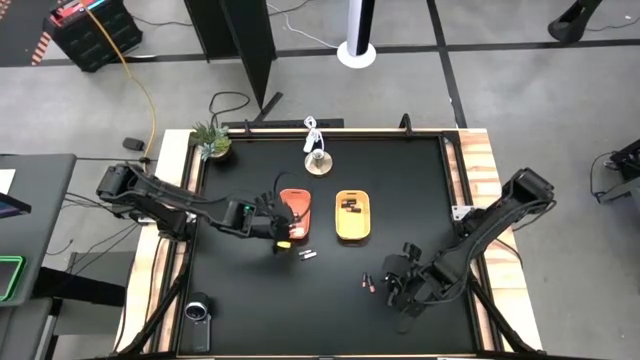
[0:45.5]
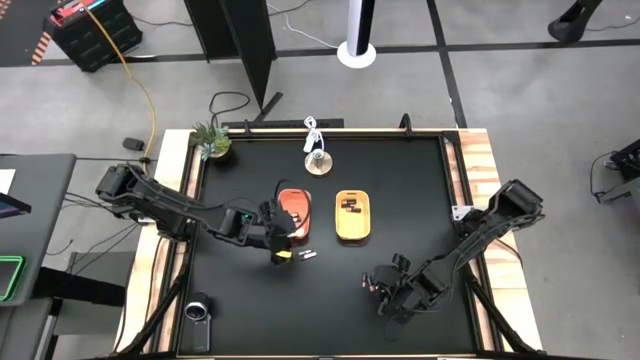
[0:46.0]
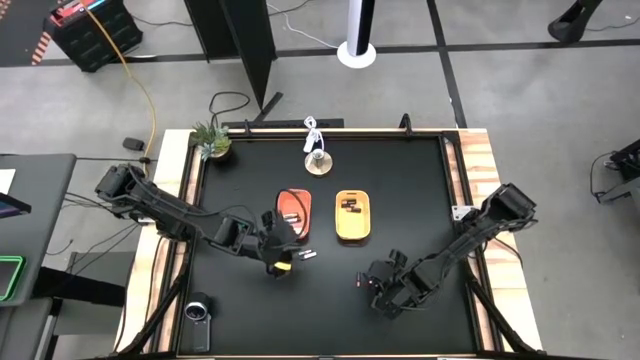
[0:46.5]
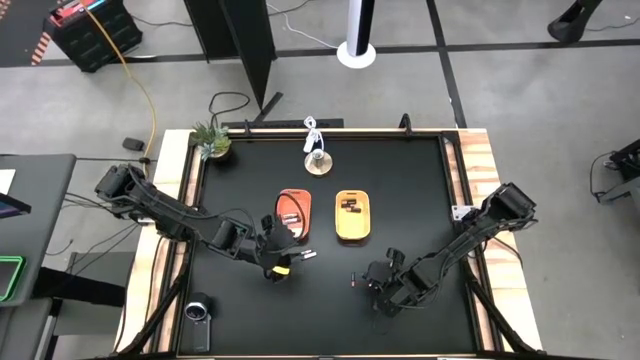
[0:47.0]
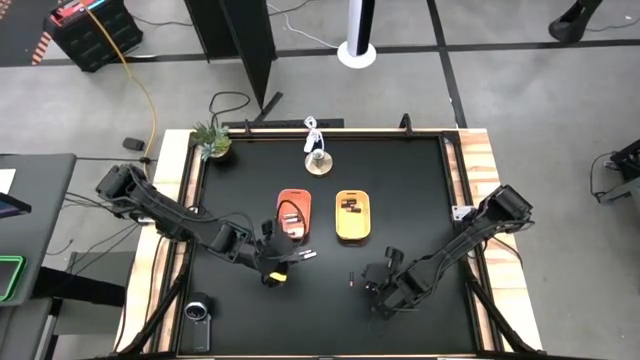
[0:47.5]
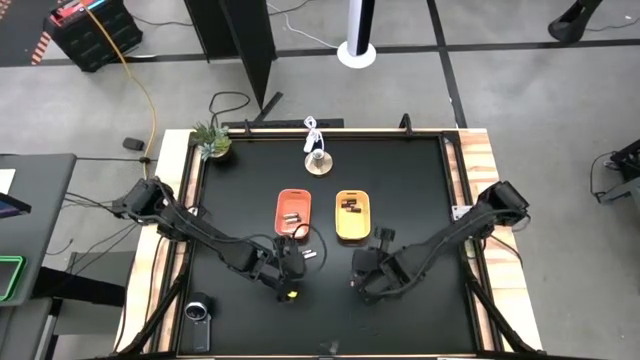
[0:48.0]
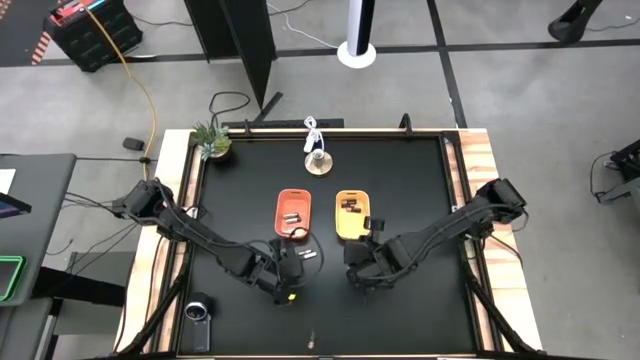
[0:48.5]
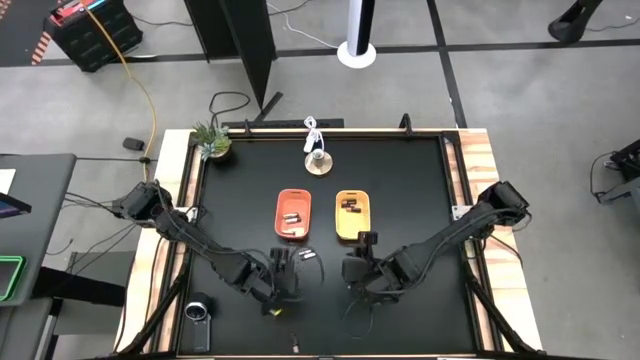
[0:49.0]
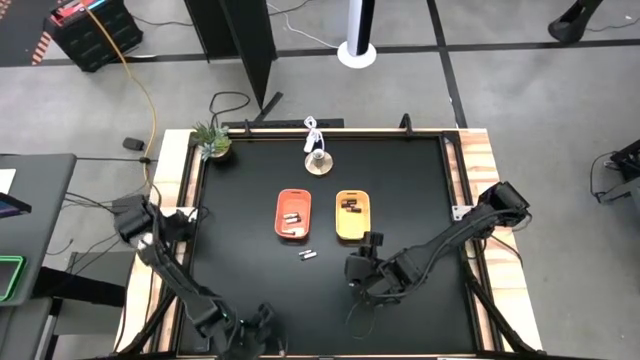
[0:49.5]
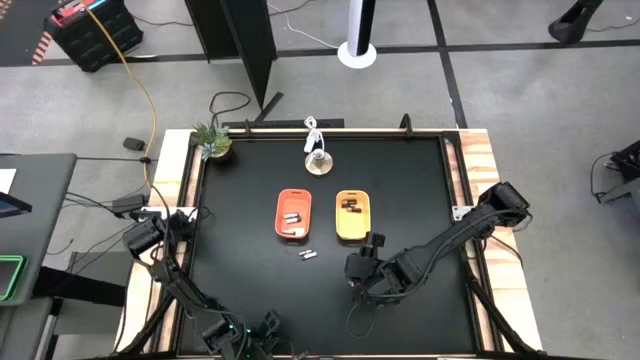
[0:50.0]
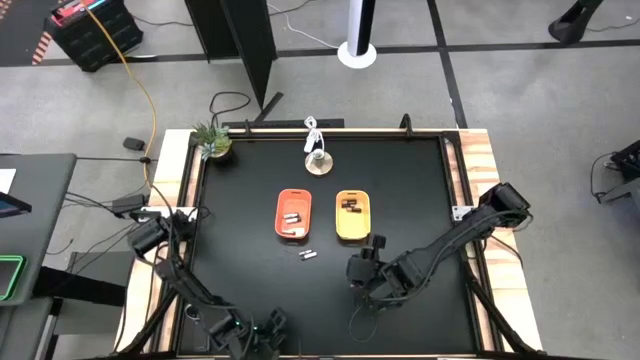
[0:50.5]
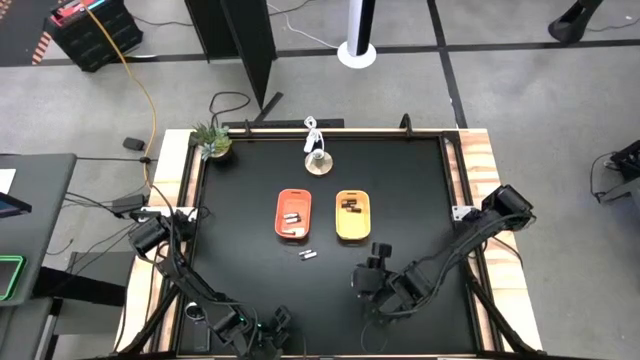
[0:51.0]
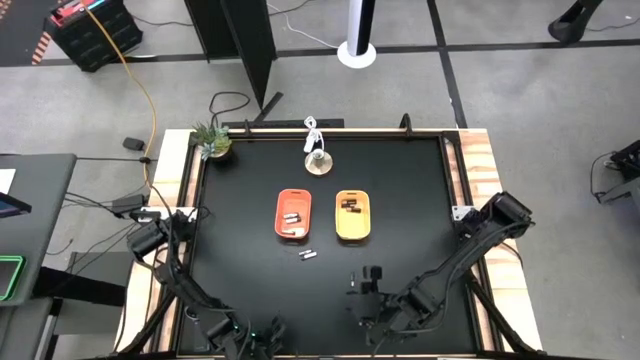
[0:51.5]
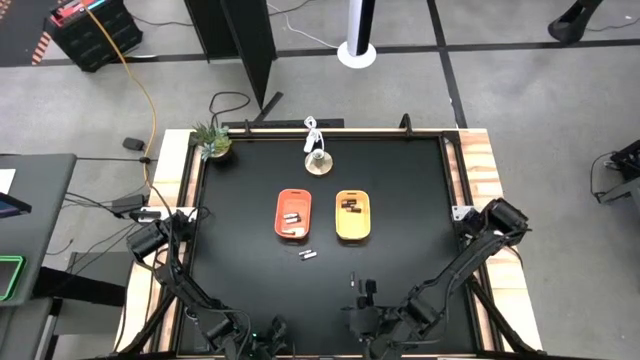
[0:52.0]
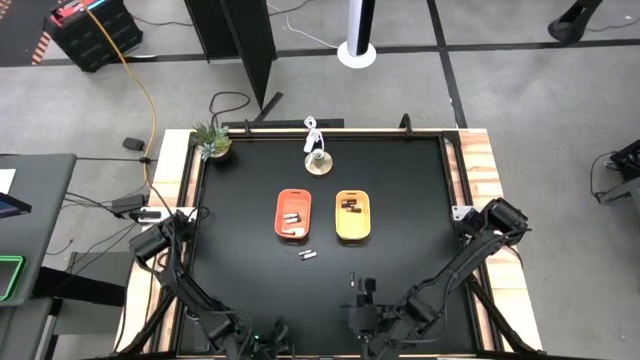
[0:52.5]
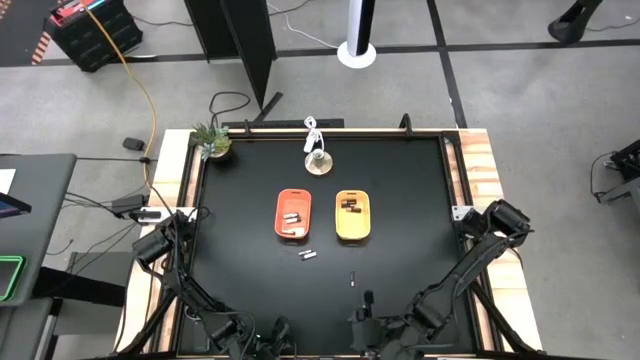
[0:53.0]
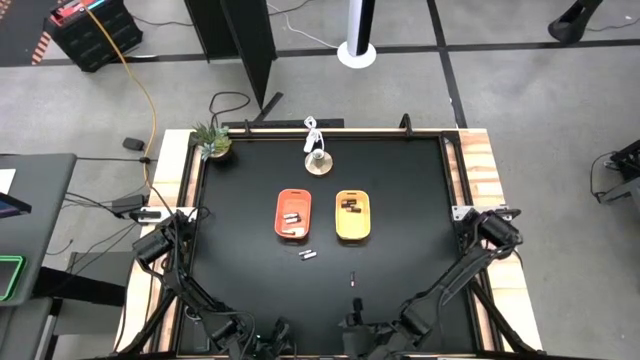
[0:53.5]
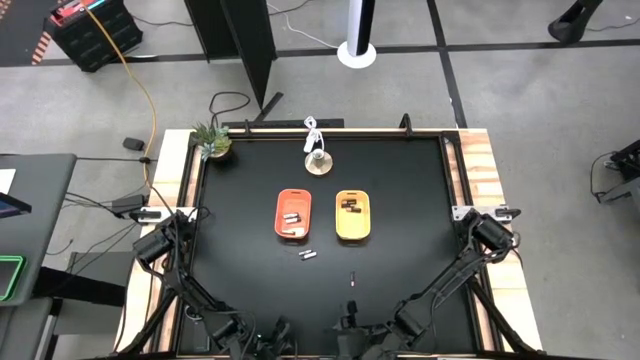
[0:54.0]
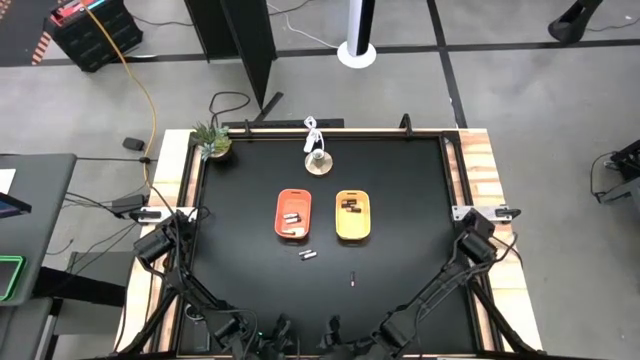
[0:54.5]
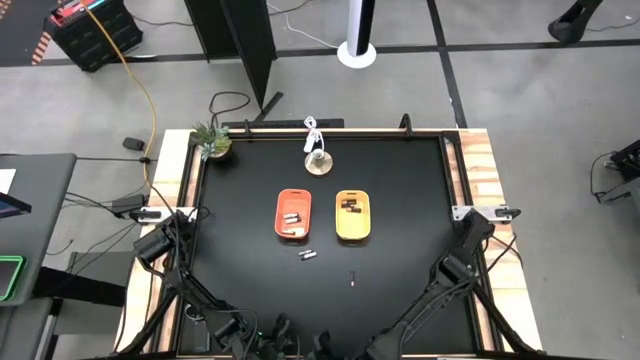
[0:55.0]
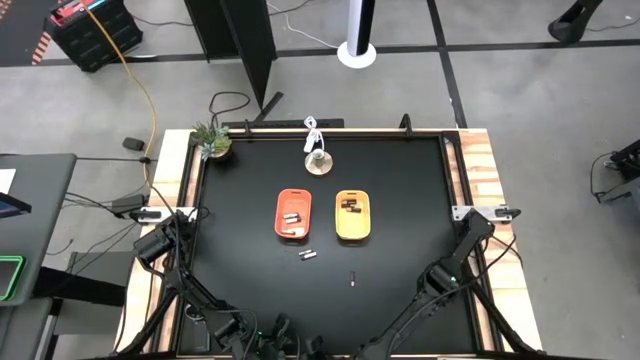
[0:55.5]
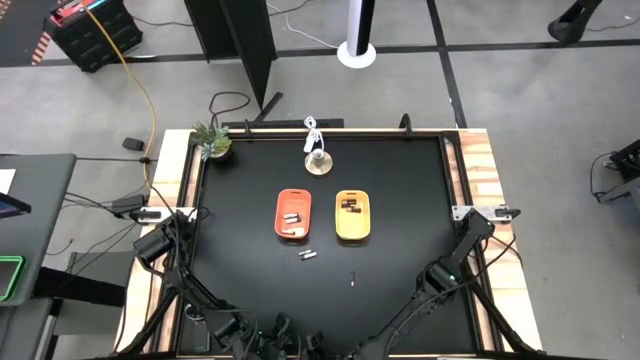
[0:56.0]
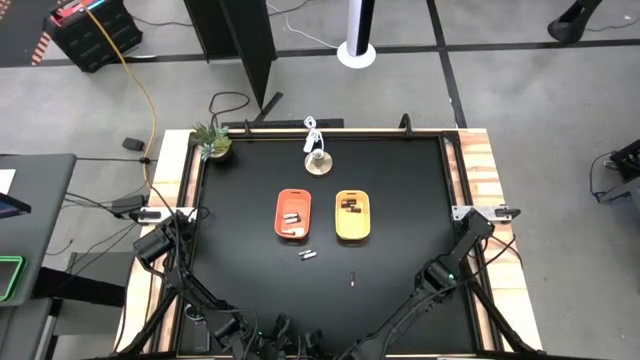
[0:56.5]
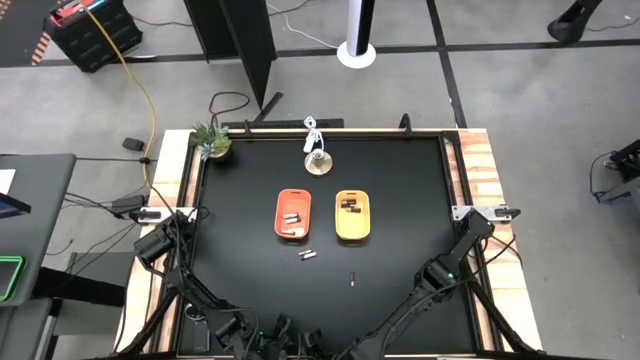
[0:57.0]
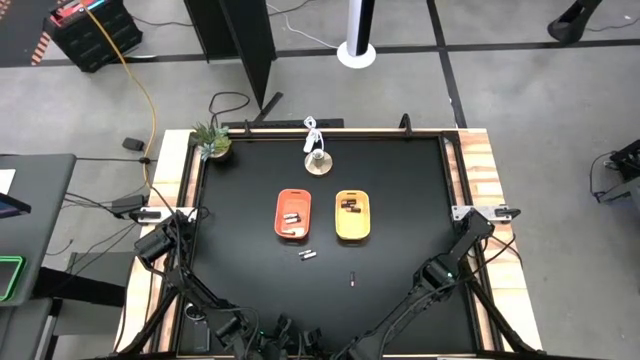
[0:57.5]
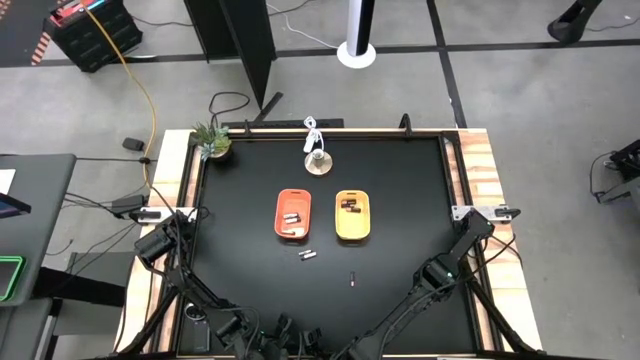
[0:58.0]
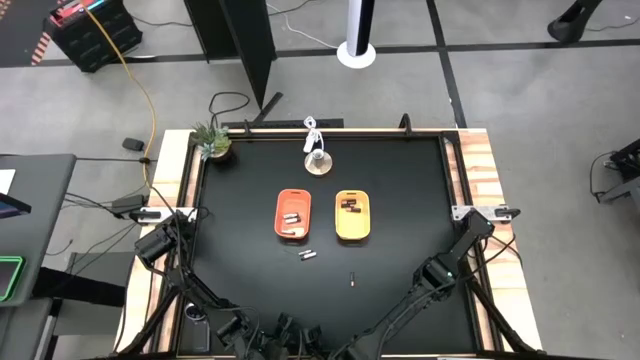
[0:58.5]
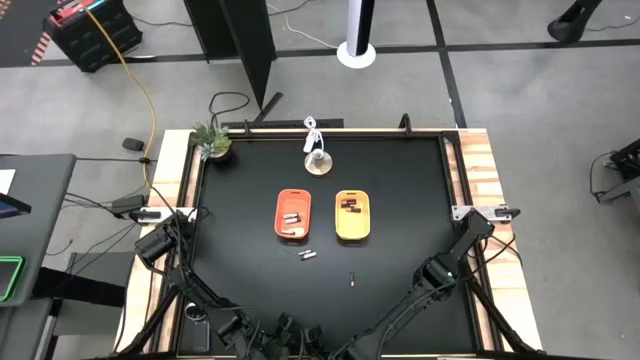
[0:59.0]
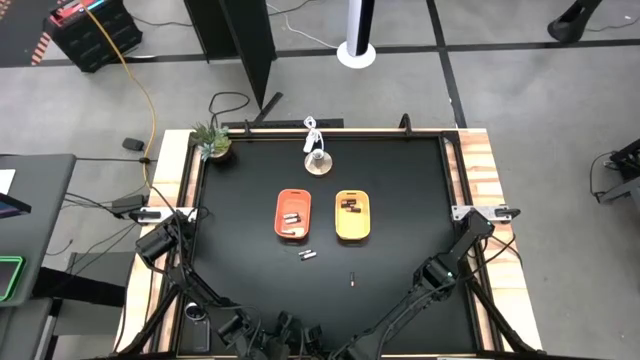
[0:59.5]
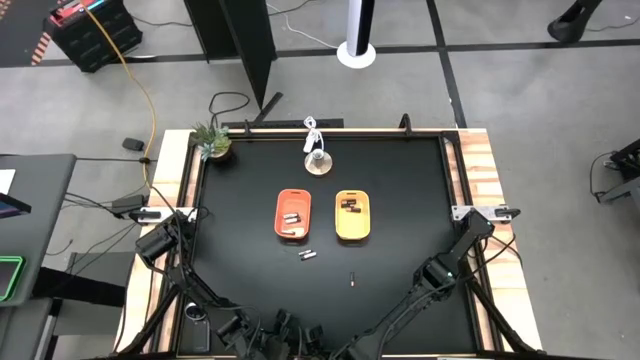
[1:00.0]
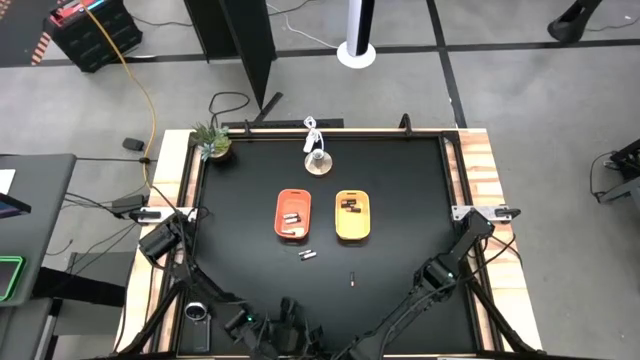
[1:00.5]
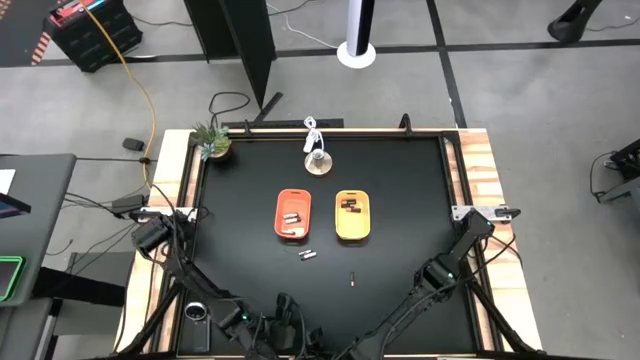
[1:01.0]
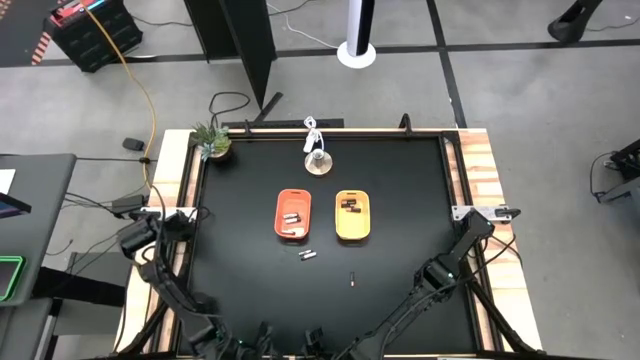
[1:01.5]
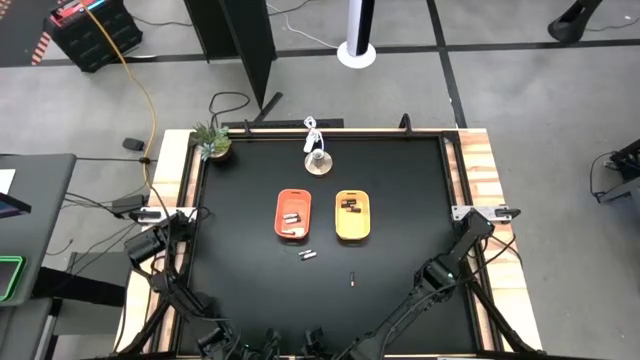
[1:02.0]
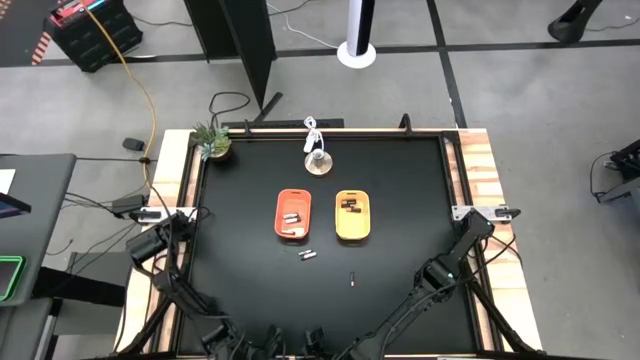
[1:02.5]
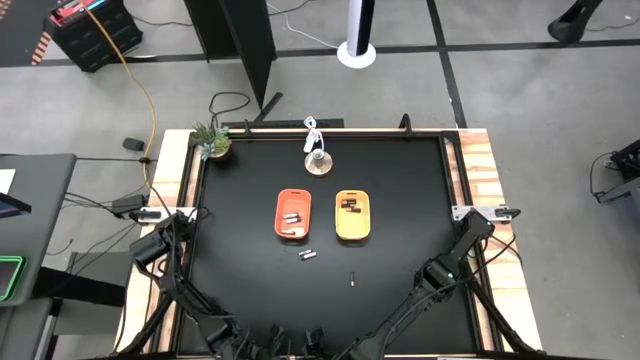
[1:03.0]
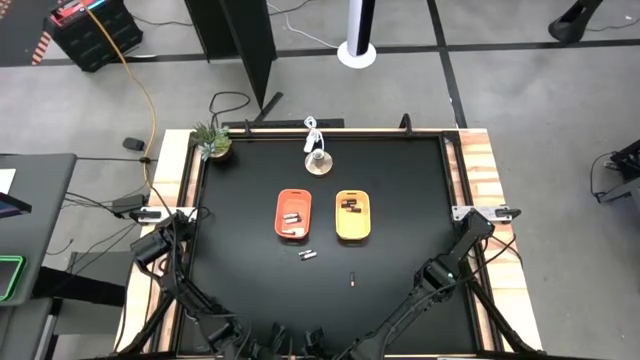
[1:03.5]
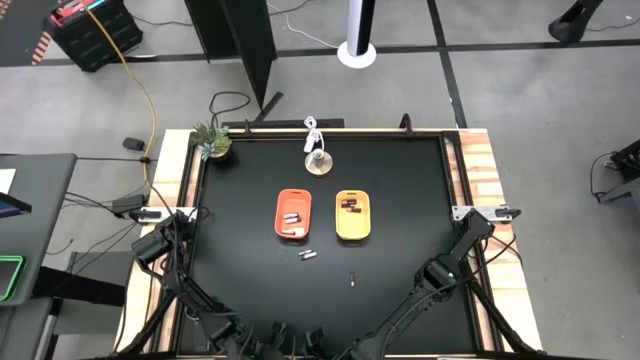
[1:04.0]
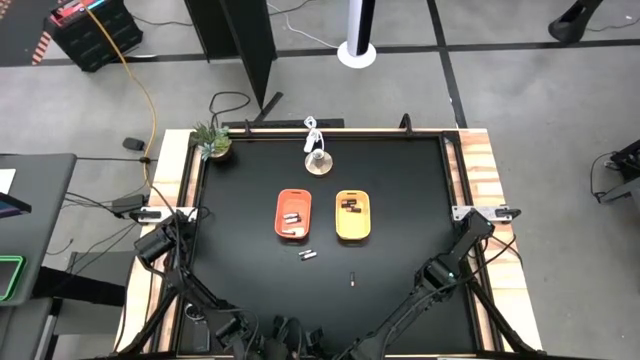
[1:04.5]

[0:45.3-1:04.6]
Task: Sort batteries
Put the black battery into the yellow bin

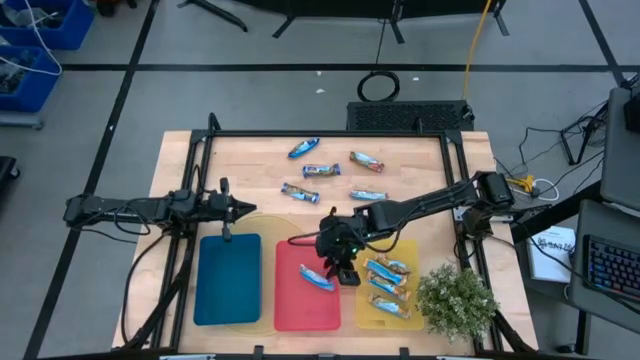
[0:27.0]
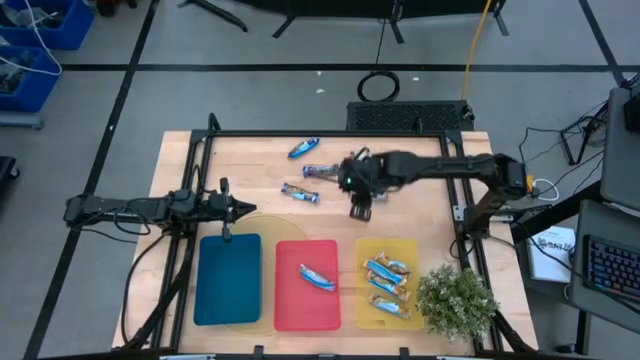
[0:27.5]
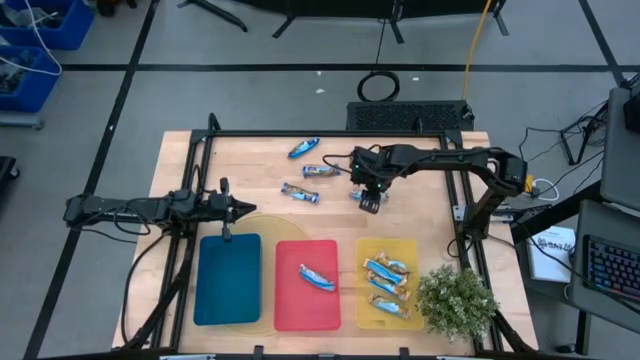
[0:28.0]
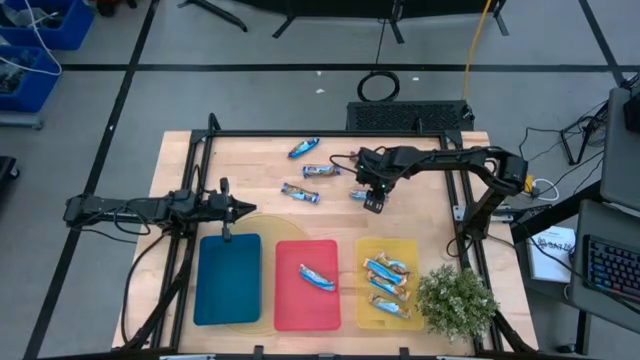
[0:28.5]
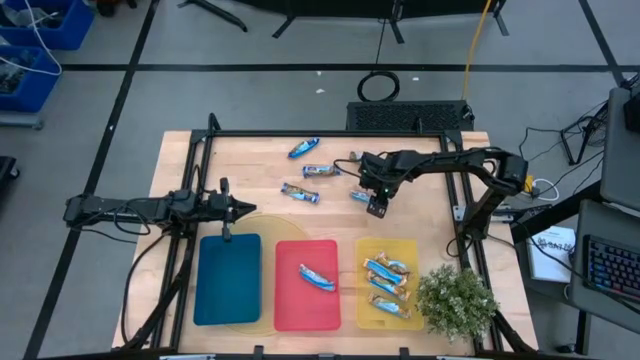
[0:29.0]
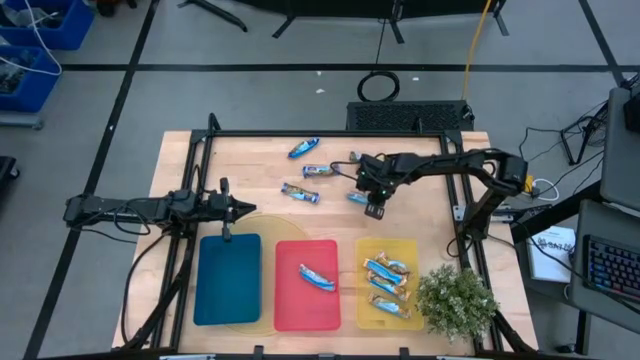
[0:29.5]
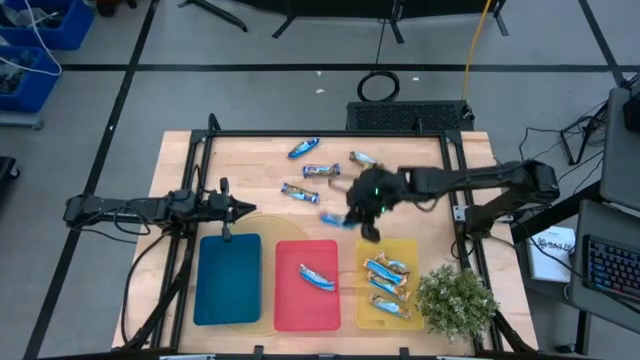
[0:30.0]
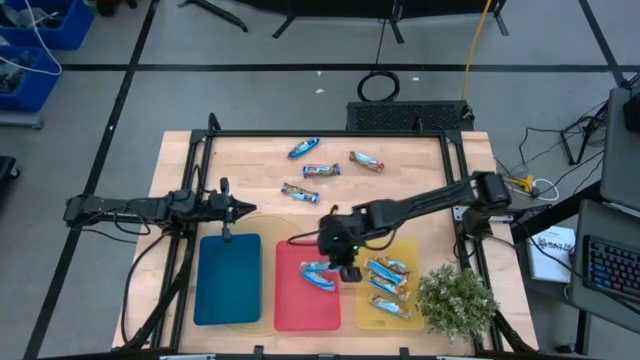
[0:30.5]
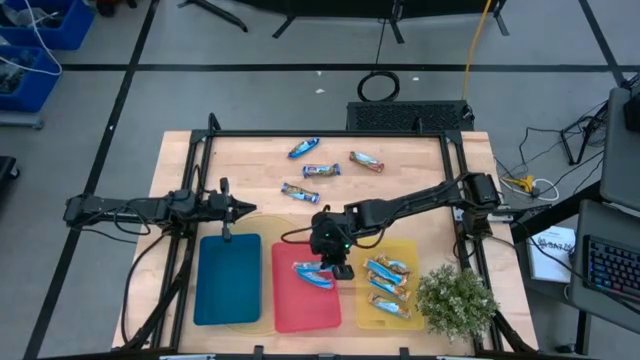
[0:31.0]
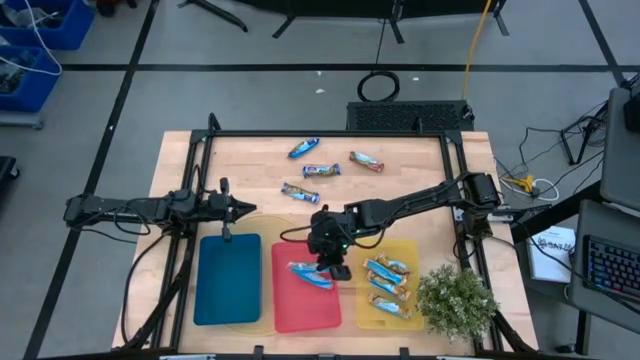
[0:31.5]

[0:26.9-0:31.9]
Task: Pick and place Granola Bars by type
Put the bottom green granola bar into the pink bin
